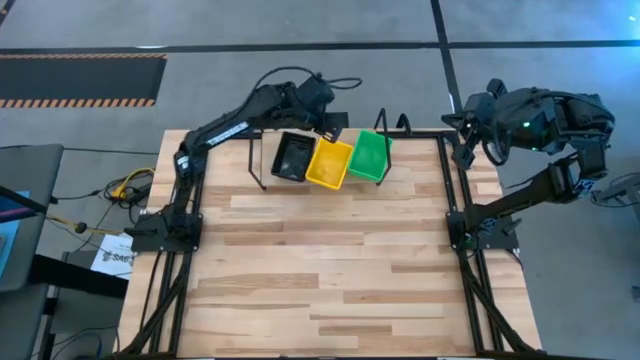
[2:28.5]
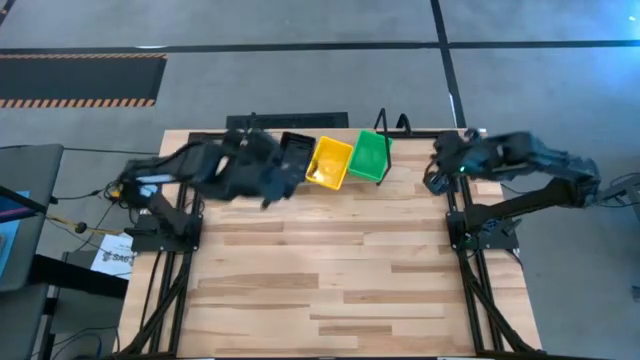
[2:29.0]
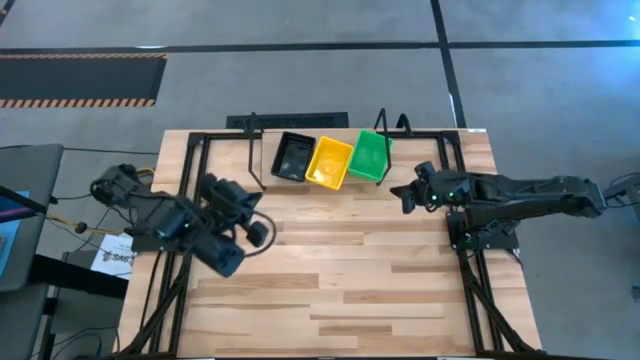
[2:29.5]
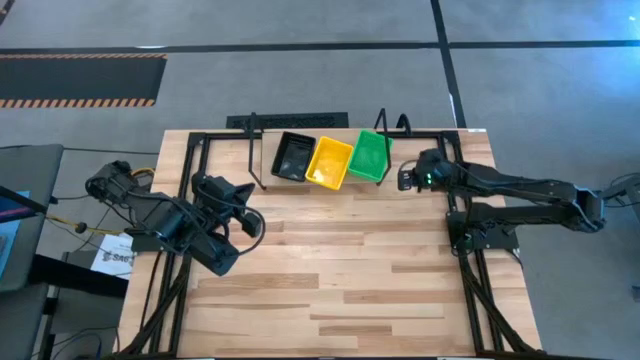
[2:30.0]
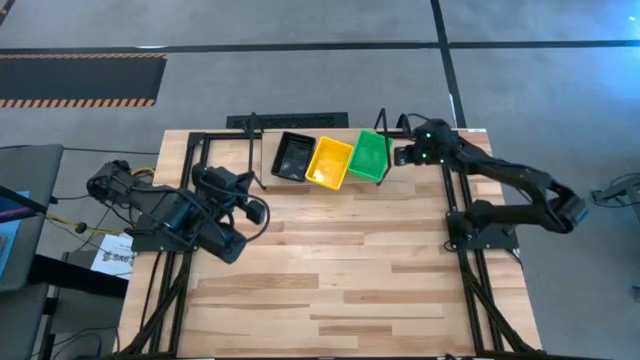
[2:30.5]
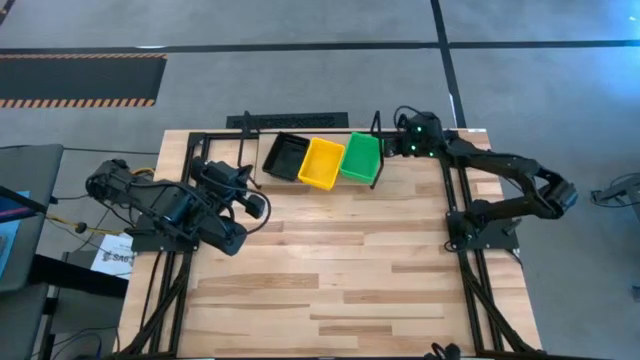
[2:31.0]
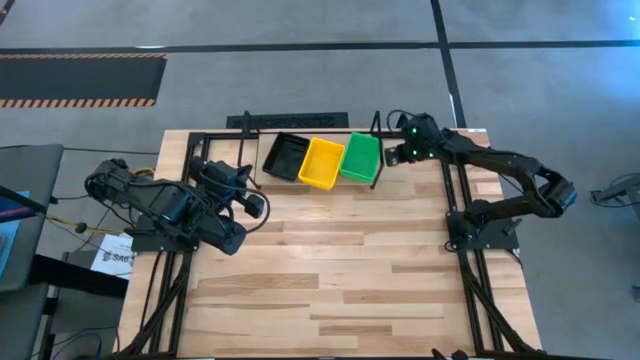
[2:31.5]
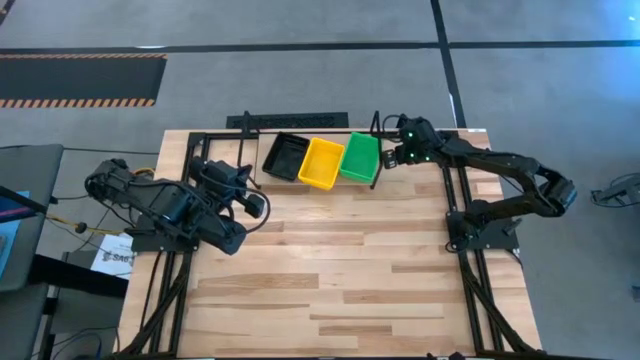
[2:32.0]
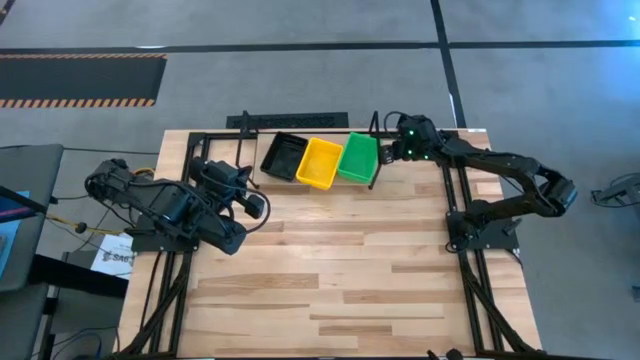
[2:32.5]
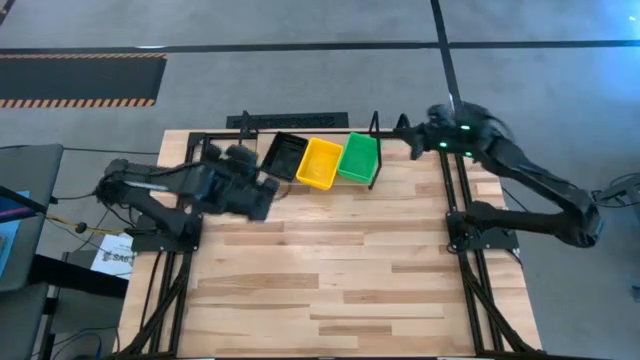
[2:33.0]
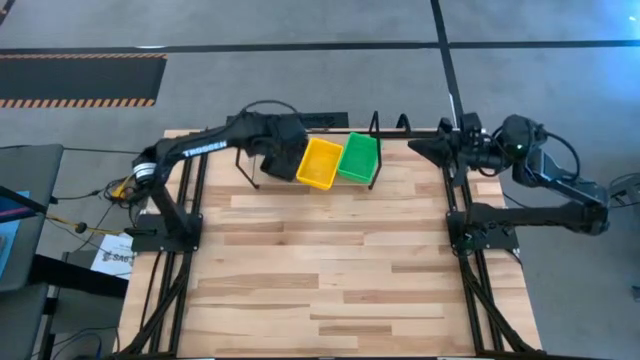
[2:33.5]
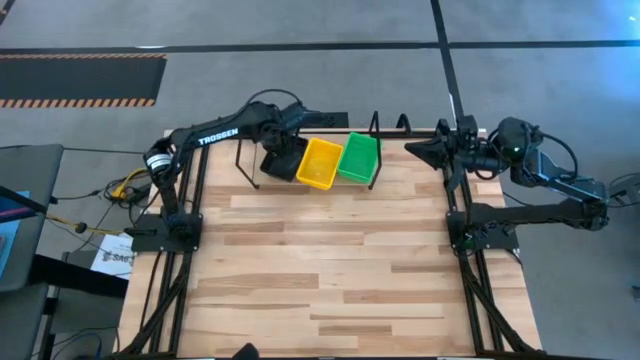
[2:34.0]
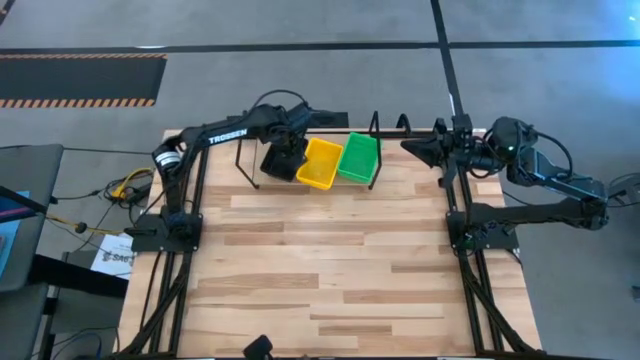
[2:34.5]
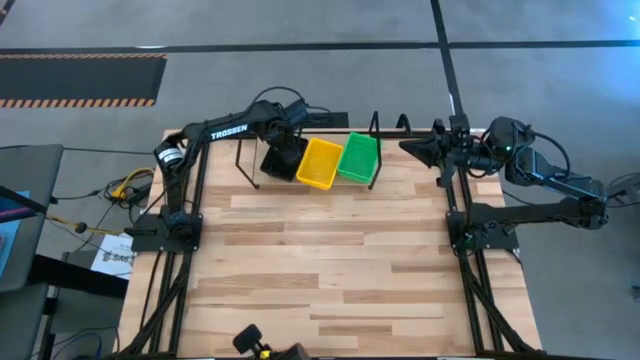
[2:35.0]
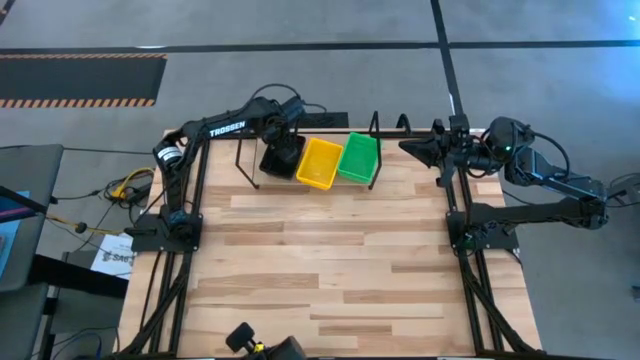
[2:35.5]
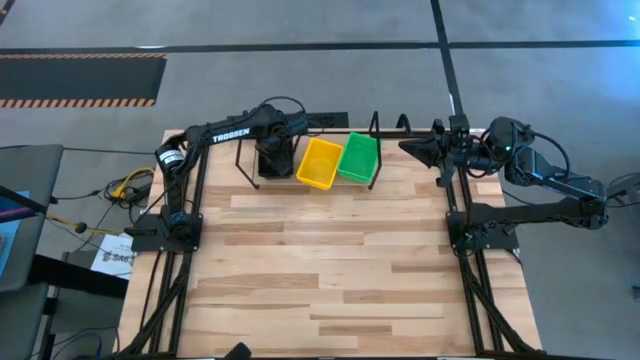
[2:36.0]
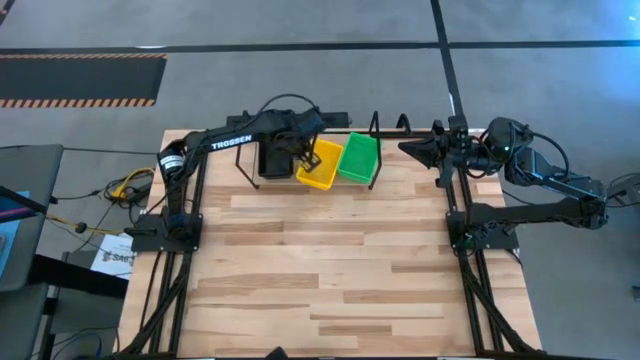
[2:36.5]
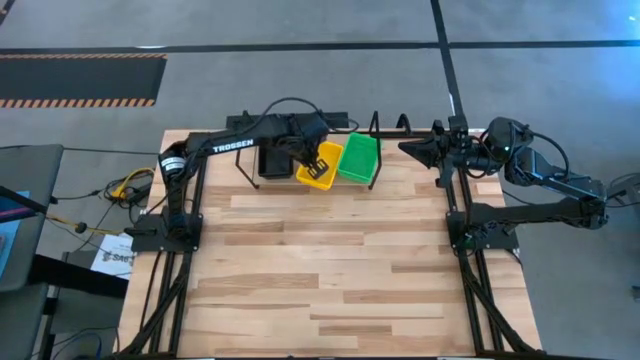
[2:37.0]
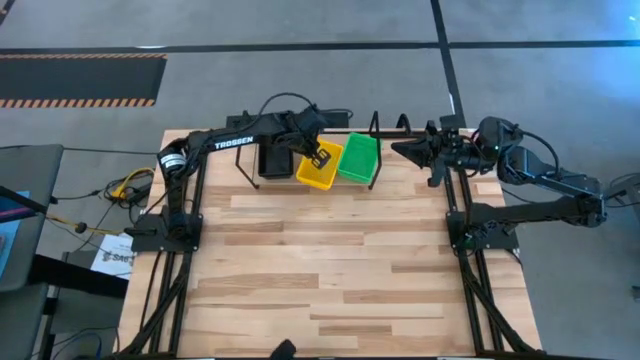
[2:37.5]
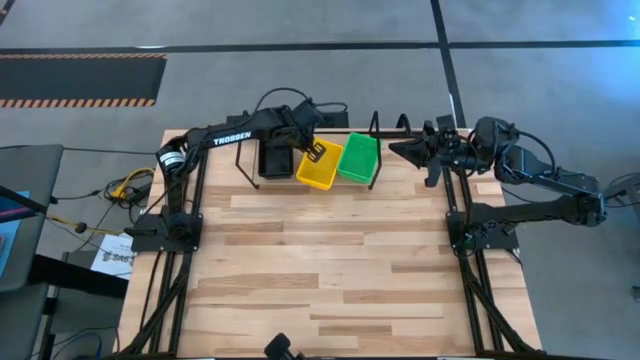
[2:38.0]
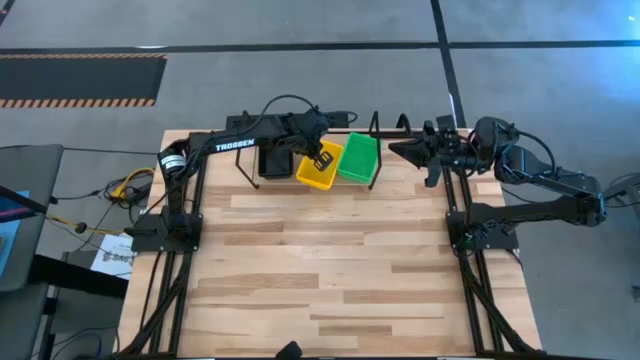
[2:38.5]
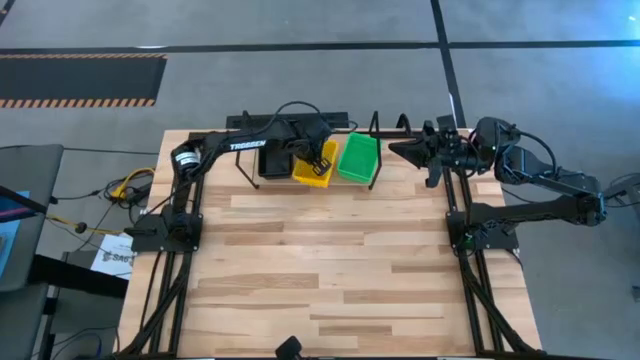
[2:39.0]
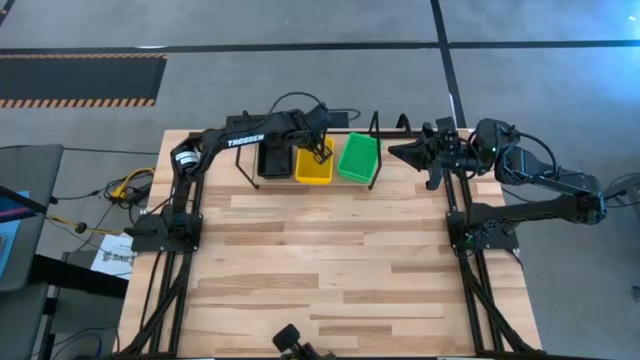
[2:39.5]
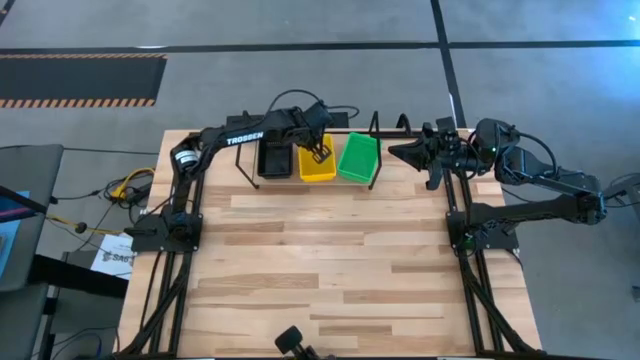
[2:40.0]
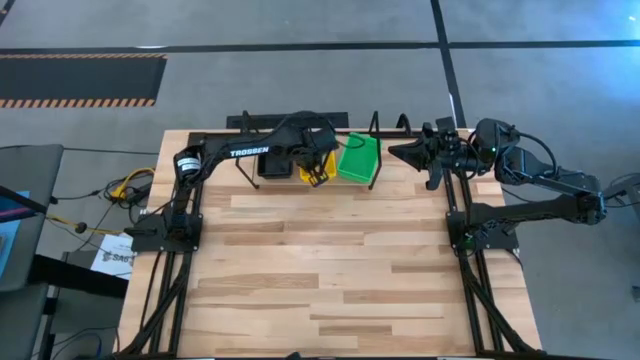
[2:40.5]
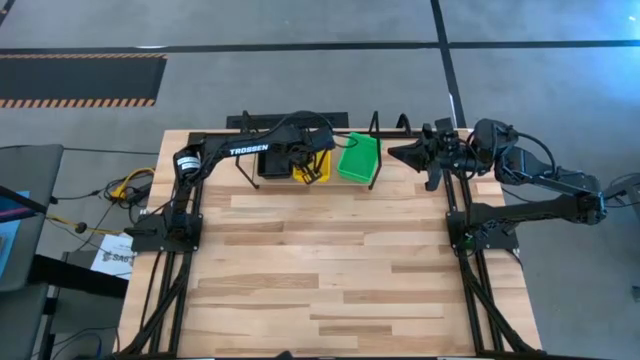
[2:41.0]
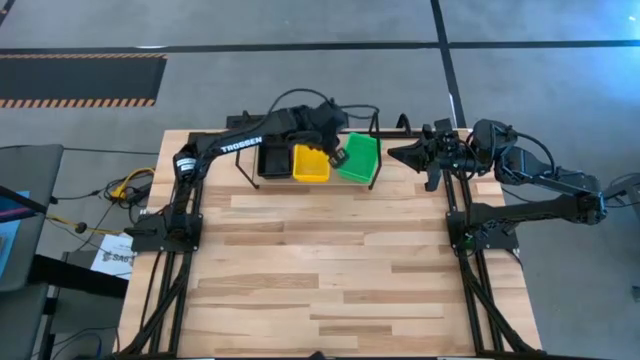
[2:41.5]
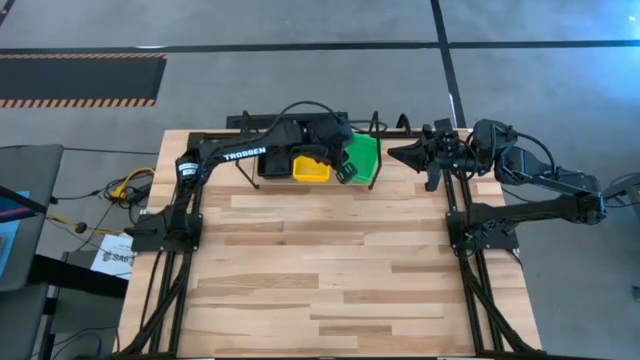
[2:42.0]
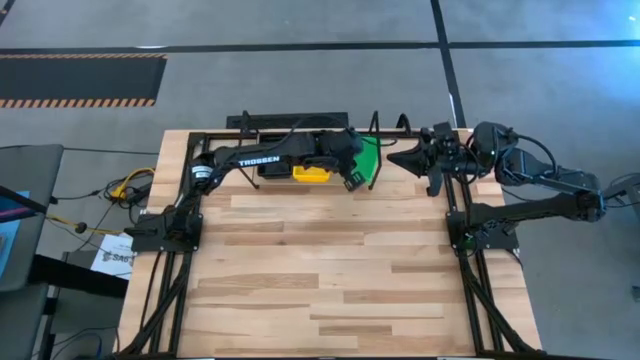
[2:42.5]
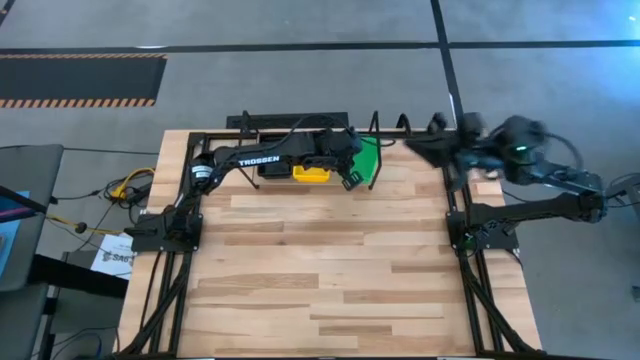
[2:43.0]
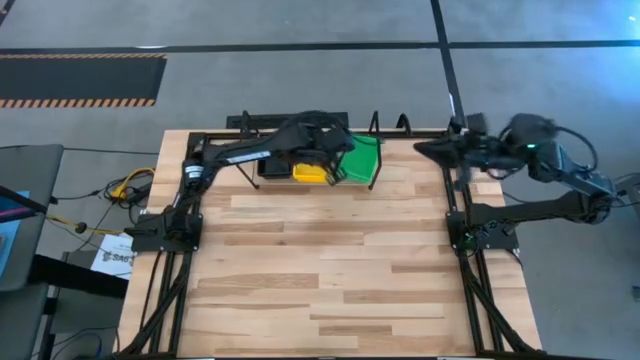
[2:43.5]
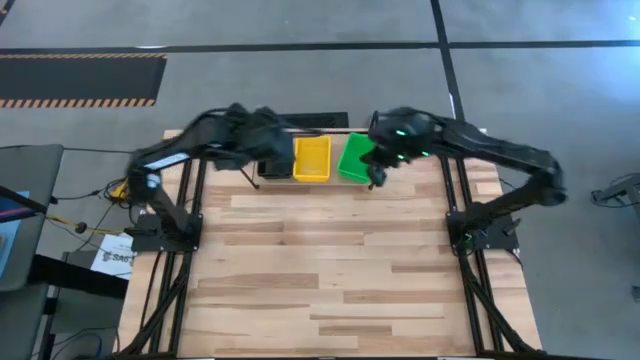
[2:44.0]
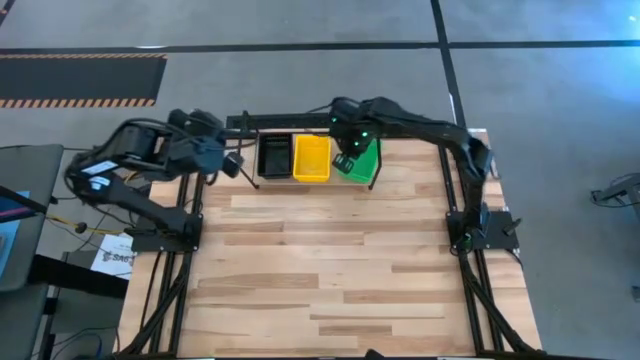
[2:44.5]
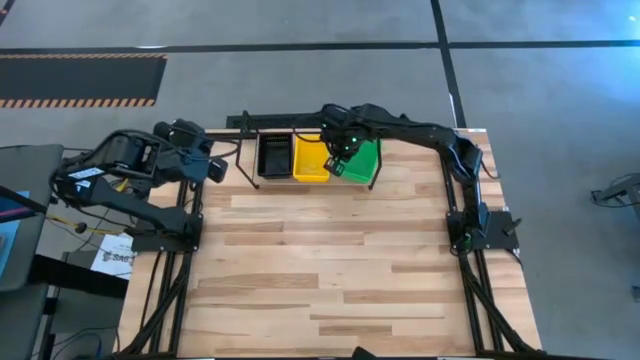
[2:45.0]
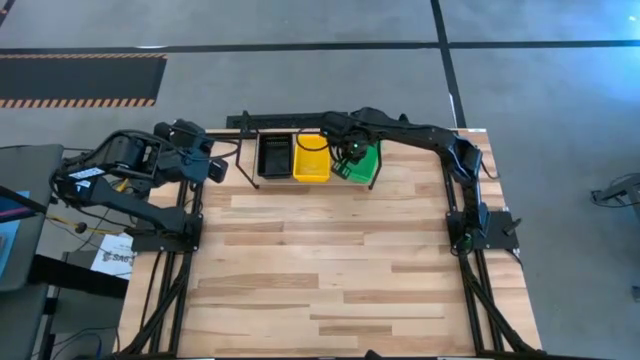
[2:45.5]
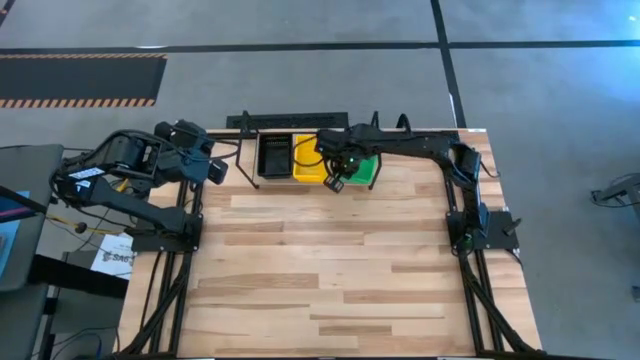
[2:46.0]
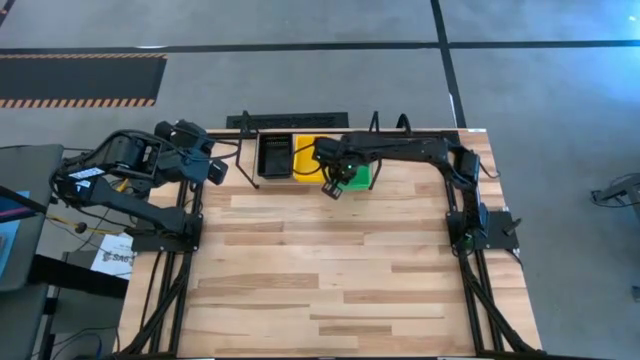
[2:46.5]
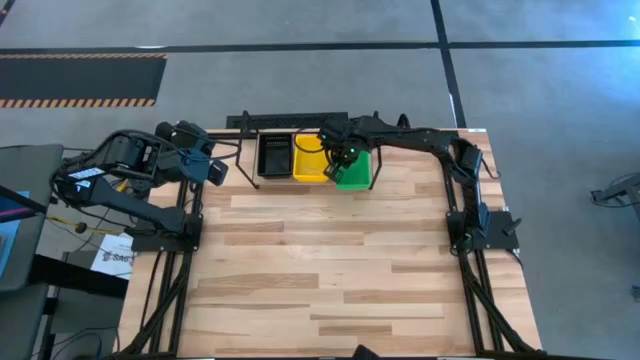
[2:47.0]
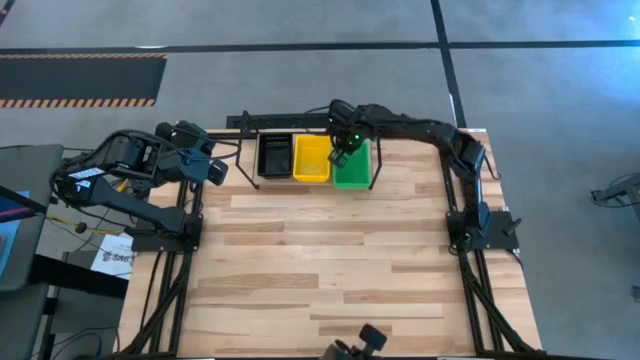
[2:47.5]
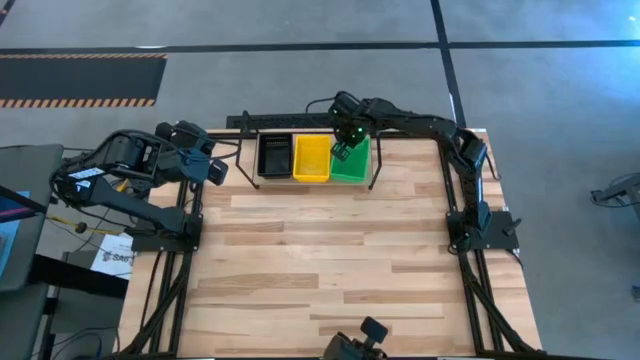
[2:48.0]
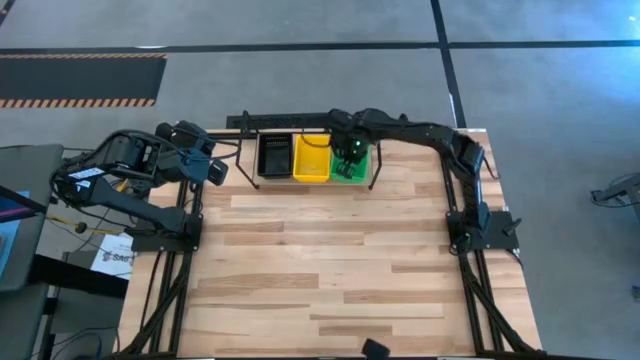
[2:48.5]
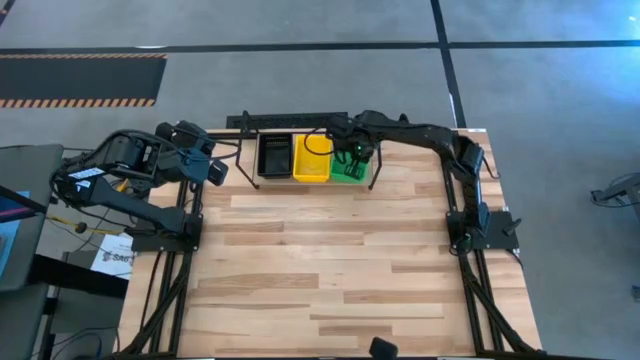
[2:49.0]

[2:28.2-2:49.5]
Task: Stack baskets on shelf by color
Adjust the bins on the shelf

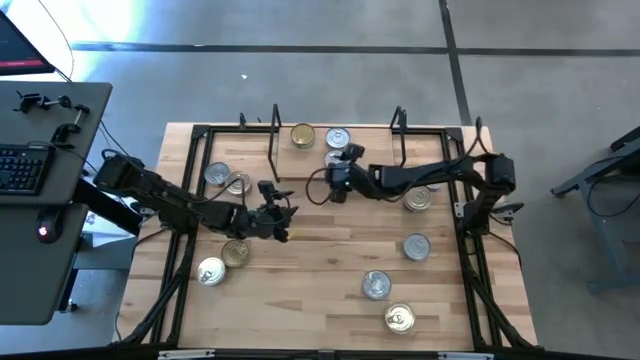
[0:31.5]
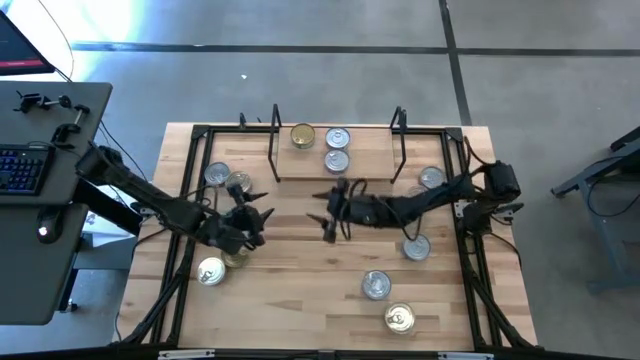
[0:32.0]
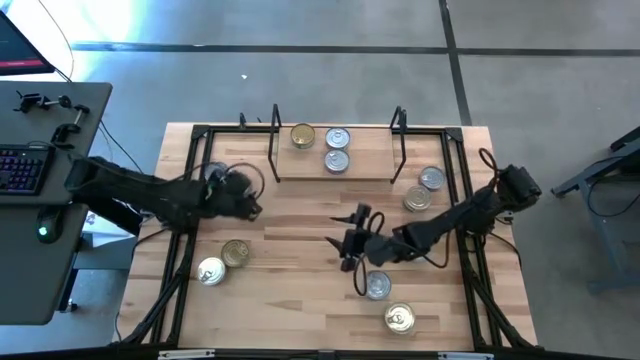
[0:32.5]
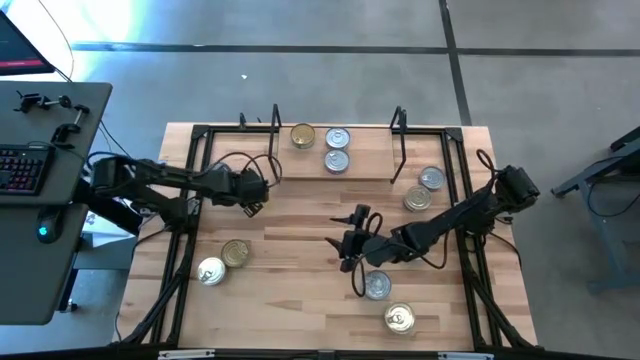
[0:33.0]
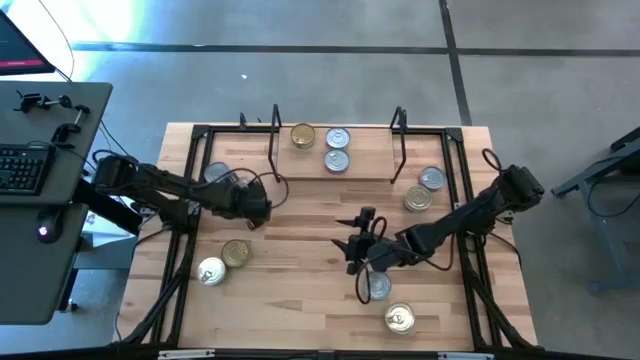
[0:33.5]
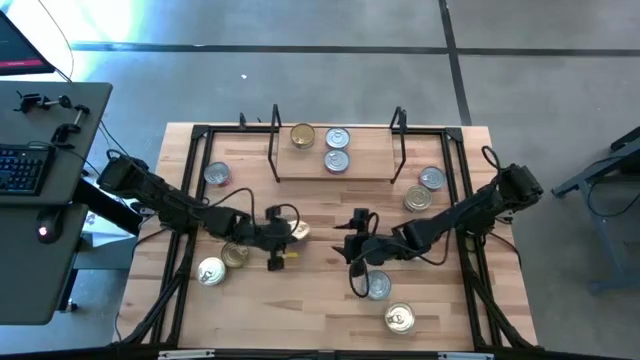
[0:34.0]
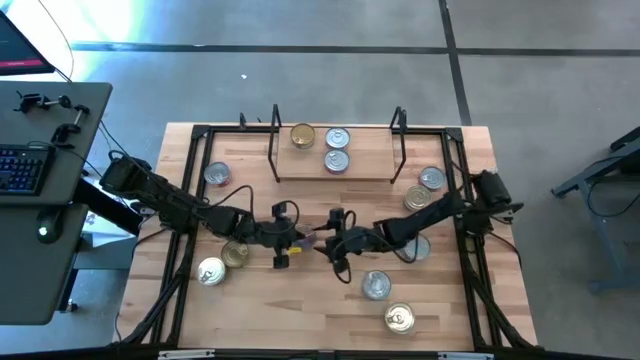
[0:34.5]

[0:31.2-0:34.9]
Task: Stack canned seafood by type on shelf
Put the blue-pink tuna can on the shelf
